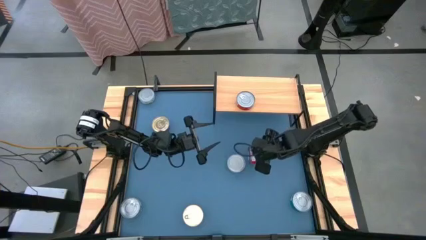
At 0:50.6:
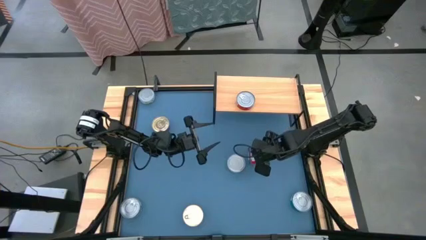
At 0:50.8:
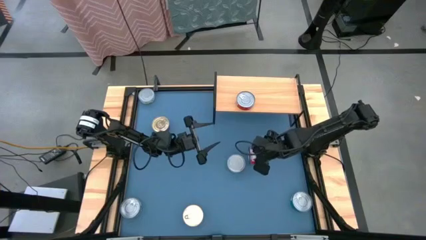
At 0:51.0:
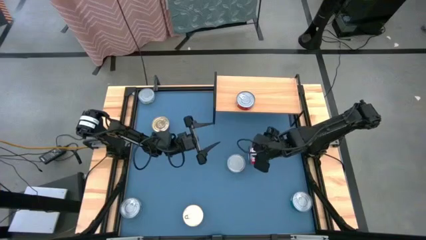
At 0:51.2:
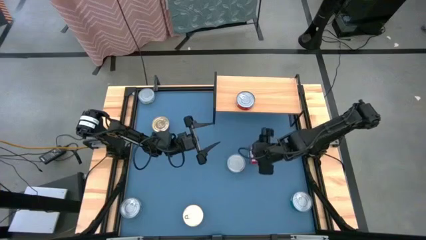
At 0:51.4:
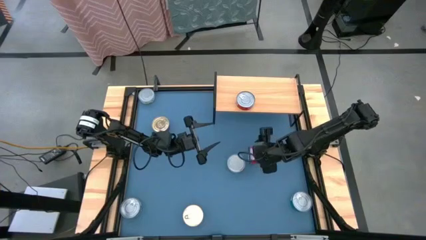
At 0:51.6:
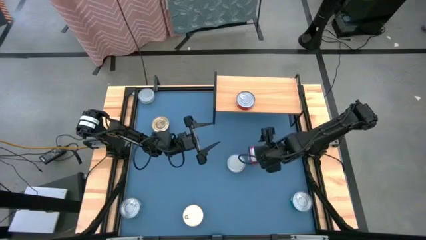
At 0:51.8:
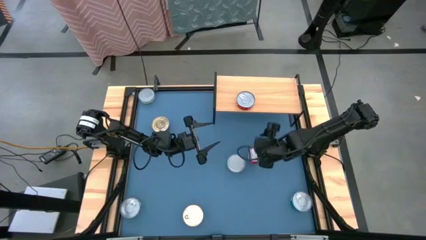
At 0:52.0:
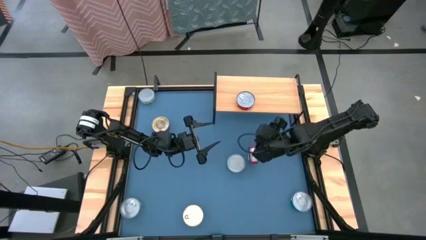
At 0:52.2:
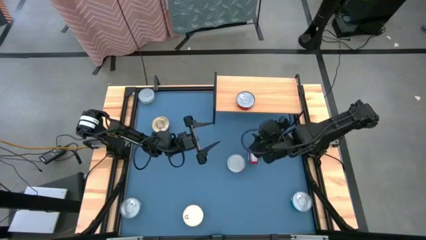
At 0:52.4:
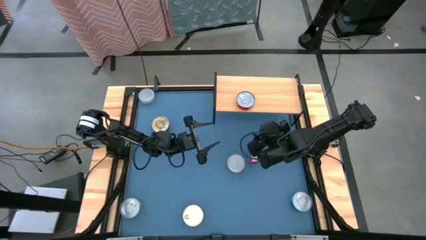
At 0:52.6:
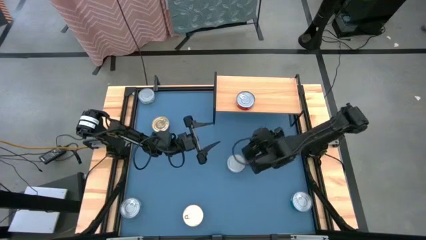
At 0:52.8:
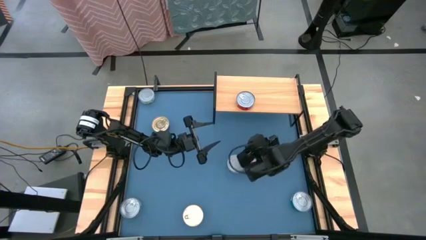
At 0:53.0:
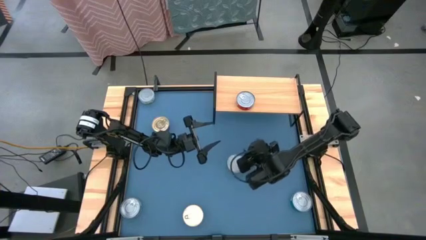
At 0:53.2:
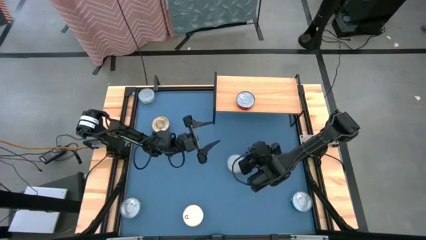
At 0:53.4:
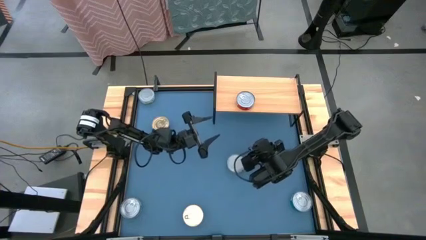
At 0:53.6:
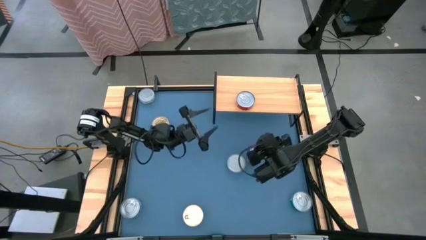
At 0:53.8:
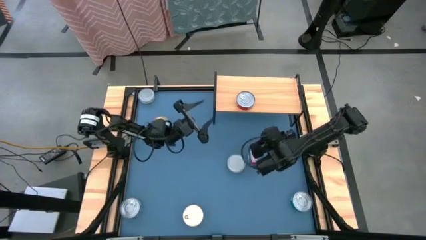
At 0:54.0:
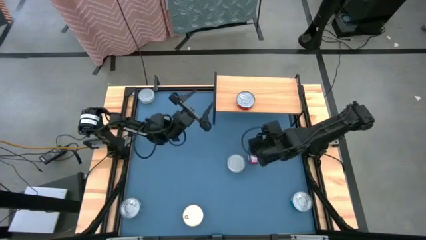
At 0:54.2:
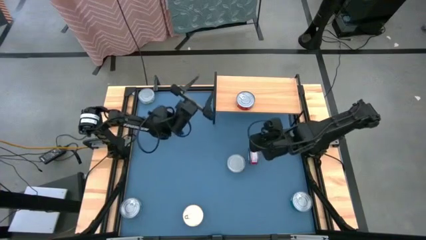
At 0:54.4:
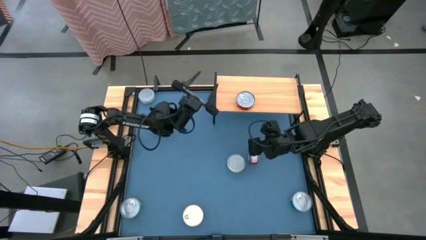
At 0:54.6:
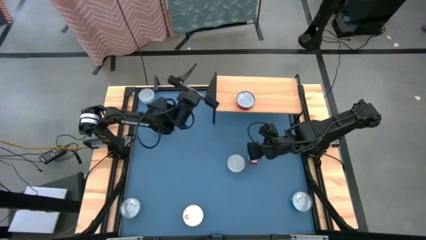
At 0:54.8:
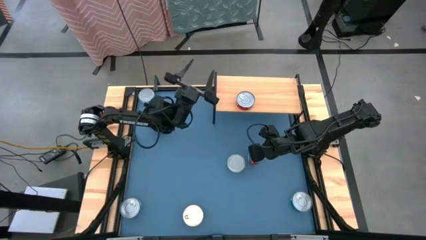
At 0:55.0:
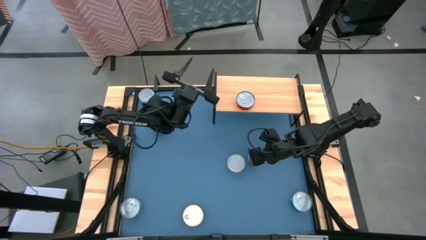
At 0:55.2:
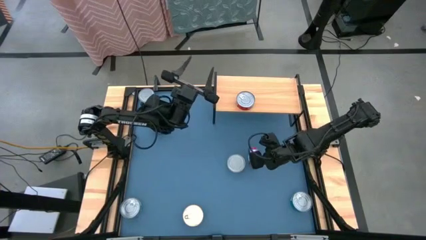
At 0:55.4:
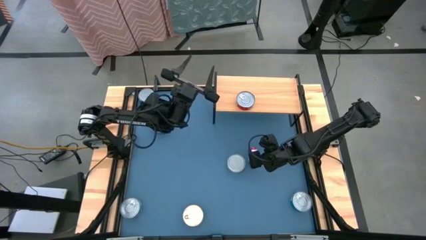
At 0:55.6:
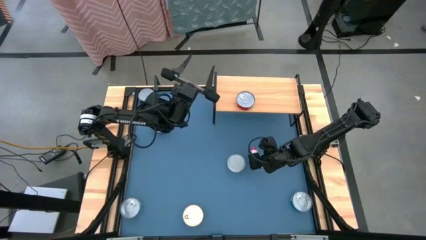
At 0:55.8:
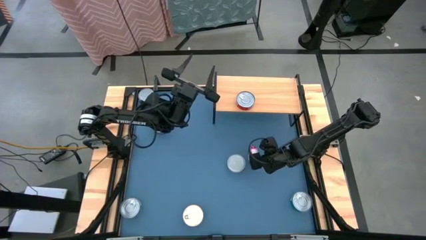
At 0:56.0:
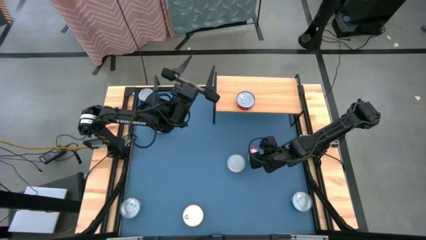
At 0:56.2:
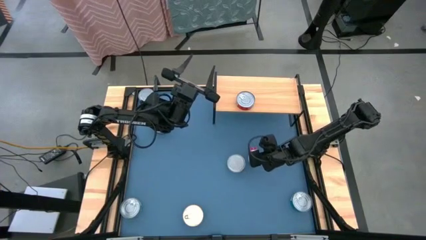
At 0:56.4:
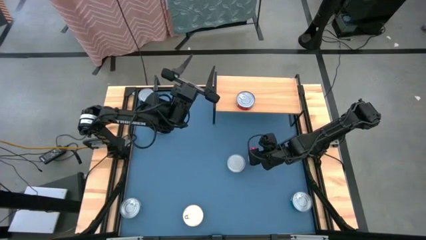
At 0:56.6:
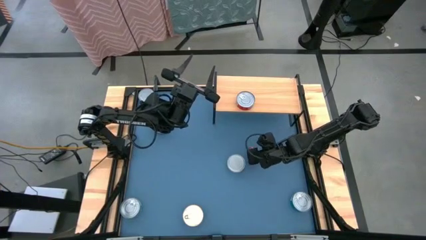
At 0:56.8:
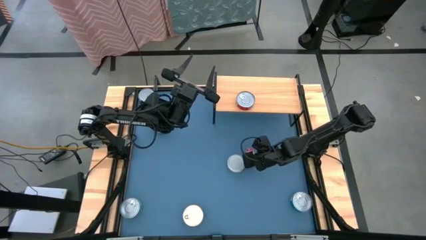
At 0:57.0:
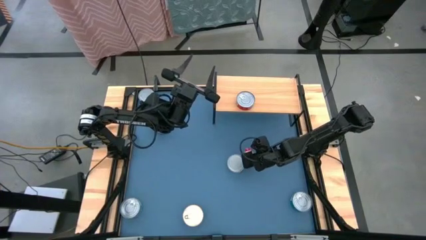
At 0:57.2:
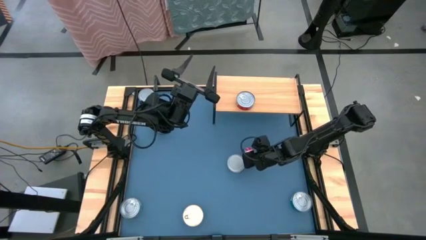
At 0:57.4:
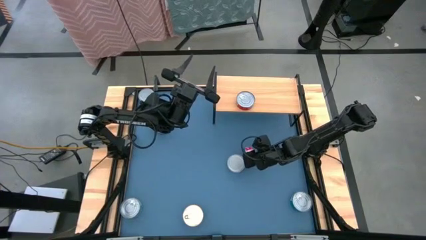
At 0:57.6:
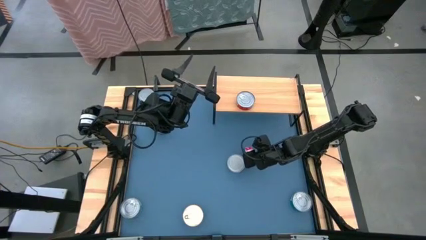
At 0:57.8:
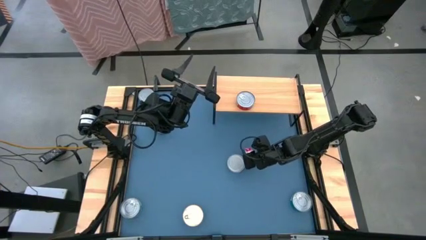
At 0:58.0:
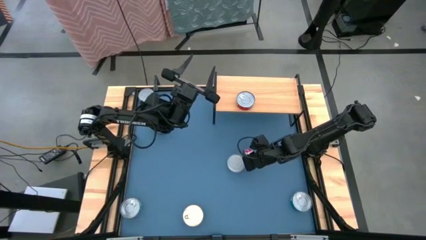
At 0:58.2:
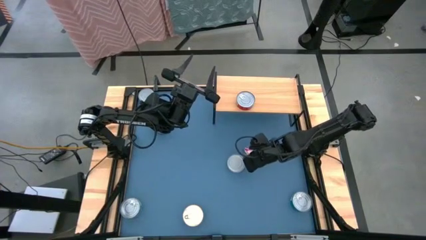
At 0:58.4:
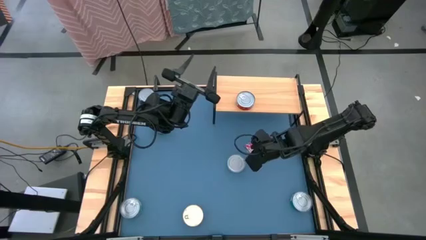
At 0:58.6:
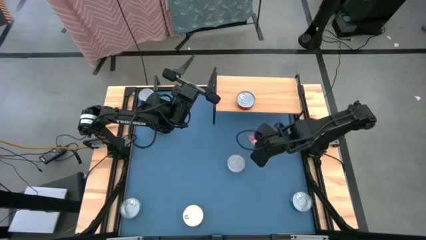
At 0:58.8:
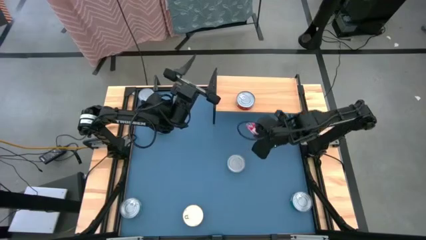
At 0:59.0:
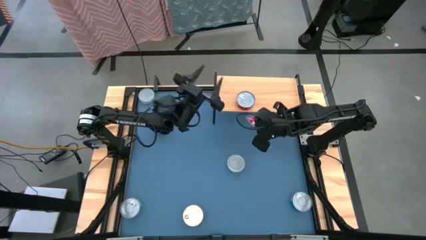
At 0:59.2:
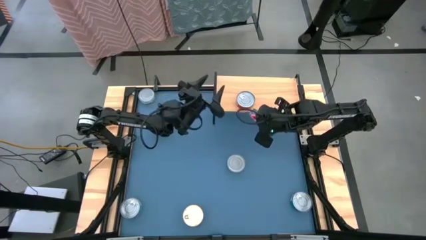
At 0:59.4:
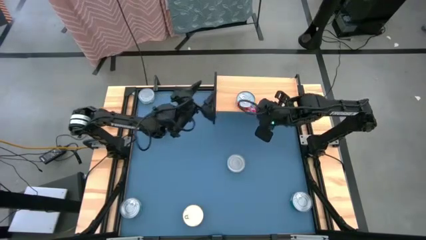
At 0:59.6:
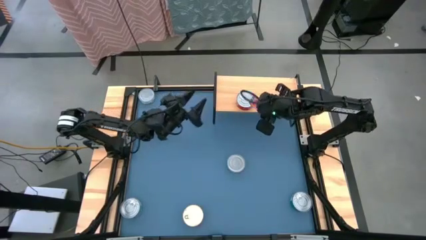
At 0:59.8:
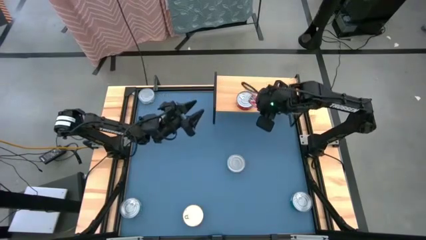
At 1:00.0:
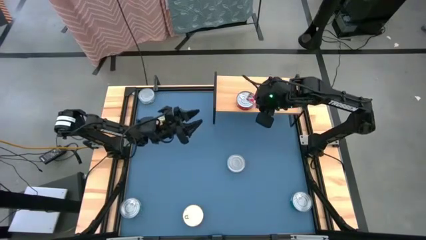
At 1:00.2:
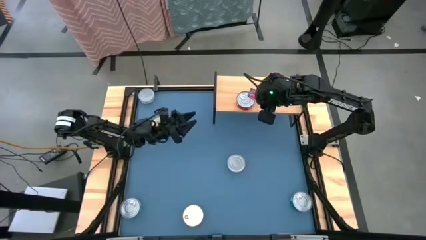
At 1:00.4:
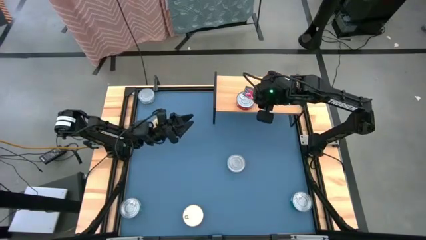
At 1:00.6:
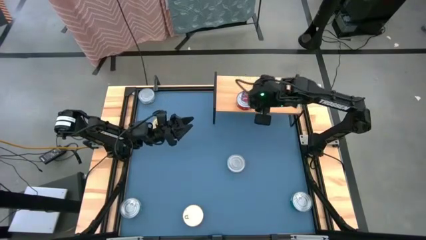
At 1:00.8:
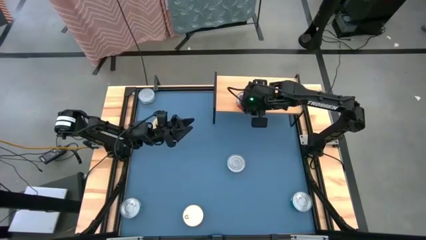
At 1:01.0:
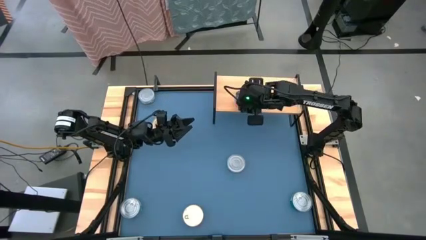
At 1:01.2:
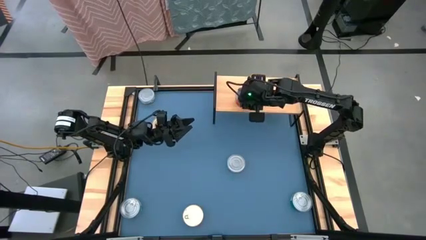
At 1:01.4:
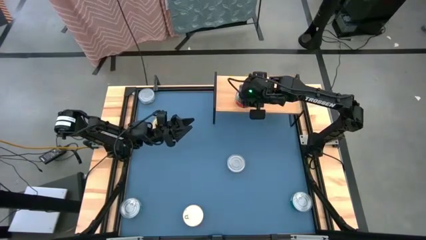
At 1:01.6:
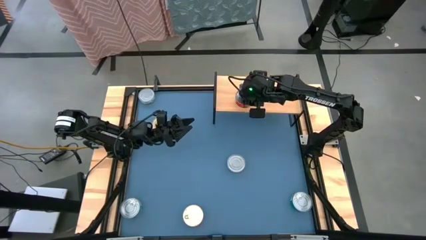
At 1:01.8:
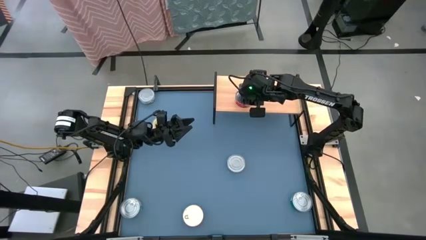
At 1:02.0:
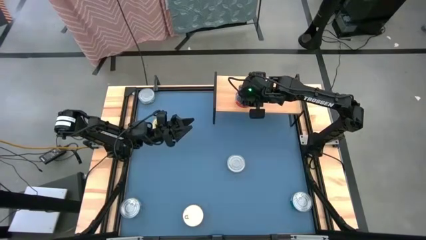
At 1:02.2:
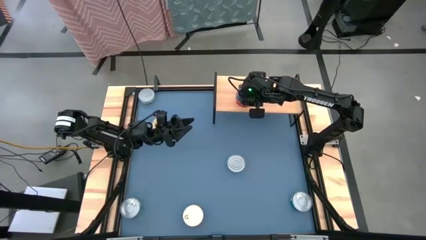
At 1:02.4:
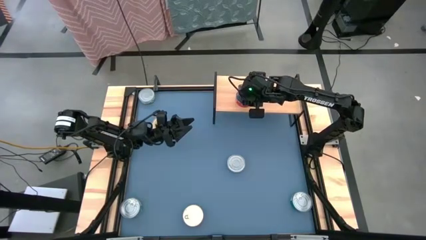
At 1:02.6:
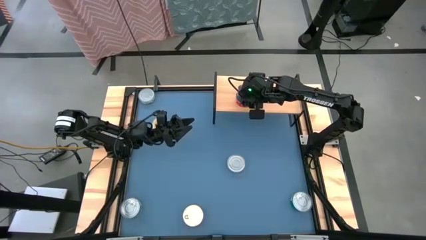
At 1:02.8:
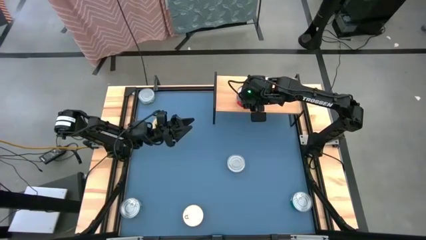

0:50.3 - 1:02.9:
Task: Stack canned seafood by type on shelf
Stack the red tuna can on top of the red tuna can on the shelf

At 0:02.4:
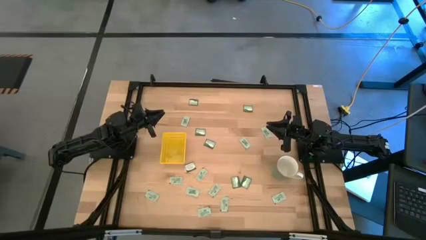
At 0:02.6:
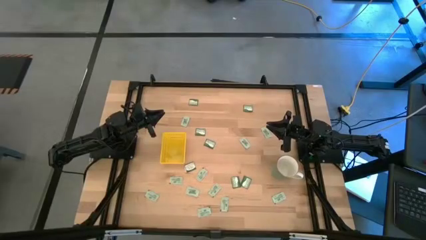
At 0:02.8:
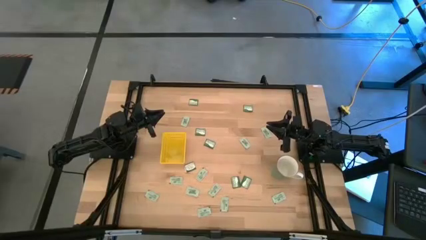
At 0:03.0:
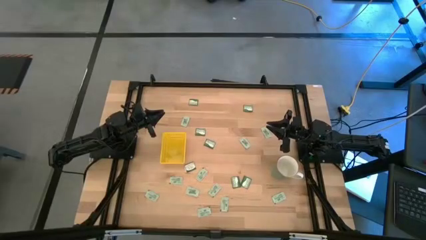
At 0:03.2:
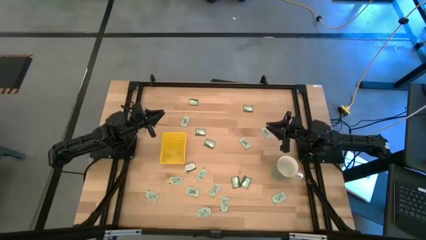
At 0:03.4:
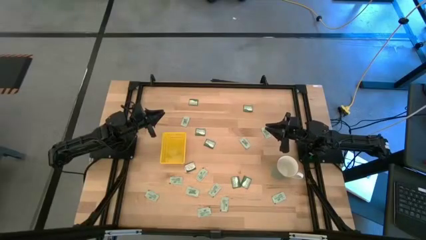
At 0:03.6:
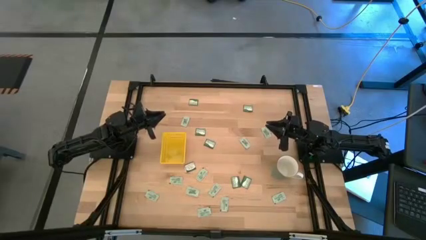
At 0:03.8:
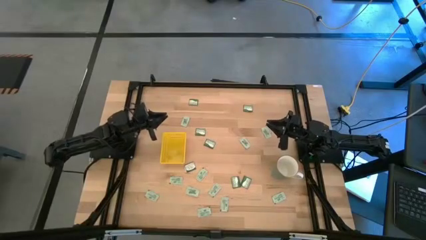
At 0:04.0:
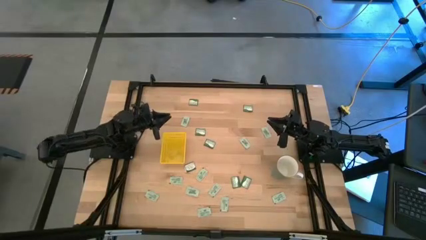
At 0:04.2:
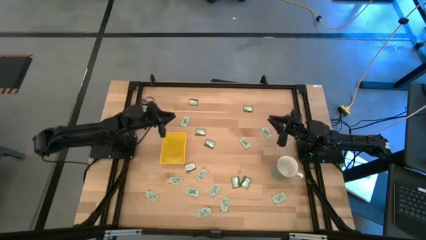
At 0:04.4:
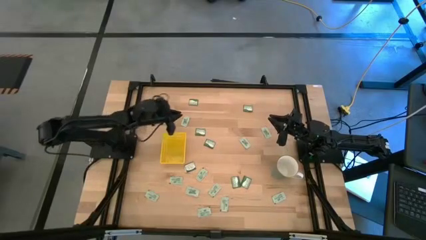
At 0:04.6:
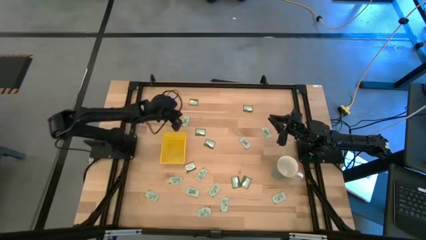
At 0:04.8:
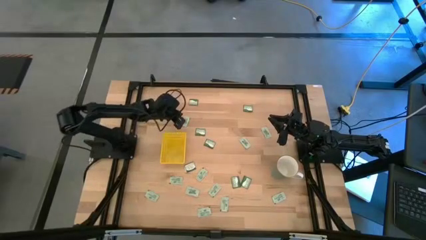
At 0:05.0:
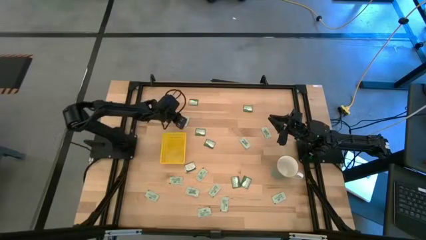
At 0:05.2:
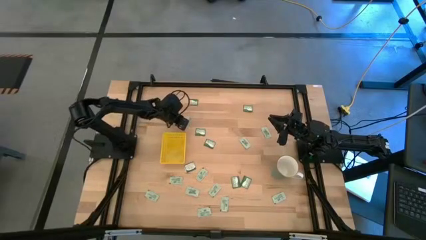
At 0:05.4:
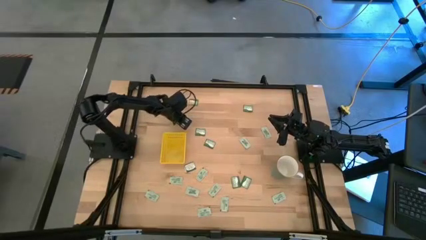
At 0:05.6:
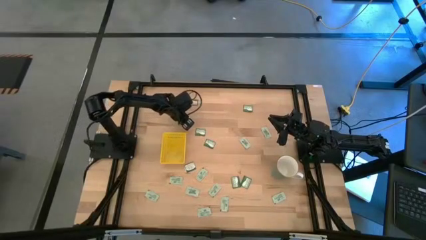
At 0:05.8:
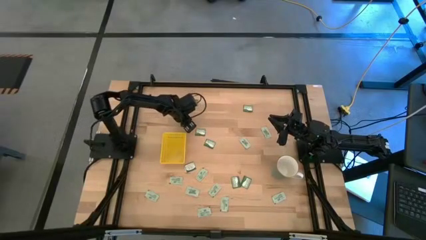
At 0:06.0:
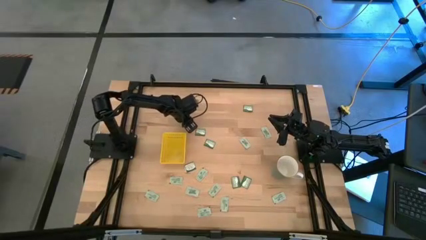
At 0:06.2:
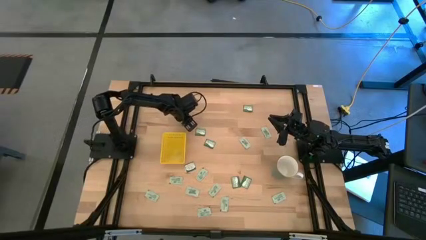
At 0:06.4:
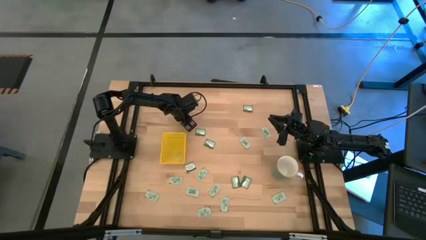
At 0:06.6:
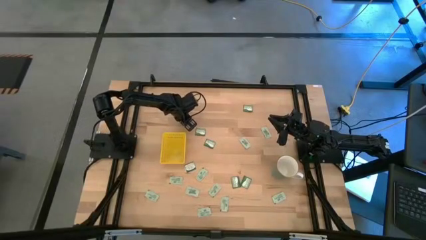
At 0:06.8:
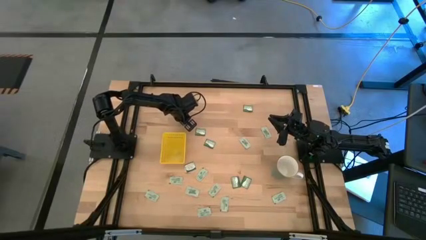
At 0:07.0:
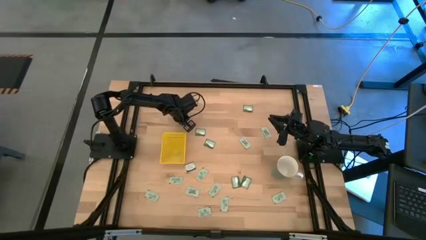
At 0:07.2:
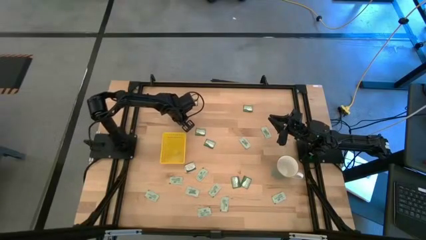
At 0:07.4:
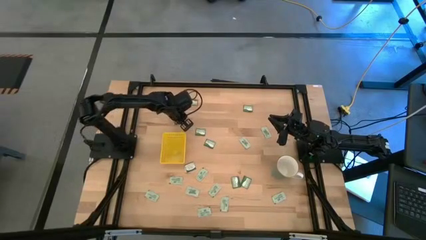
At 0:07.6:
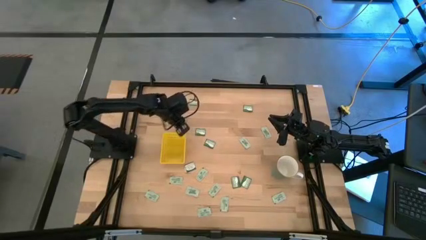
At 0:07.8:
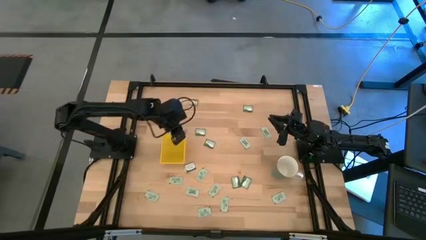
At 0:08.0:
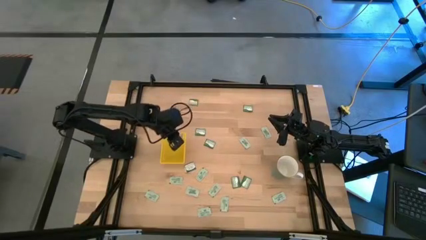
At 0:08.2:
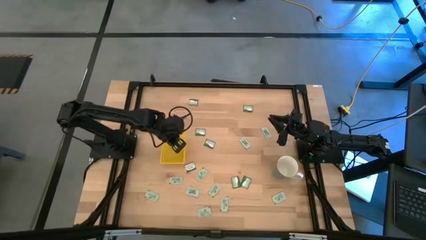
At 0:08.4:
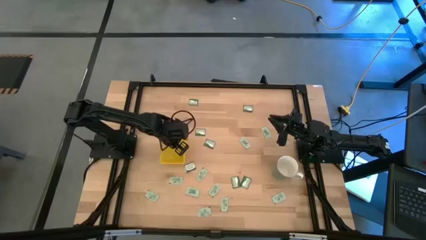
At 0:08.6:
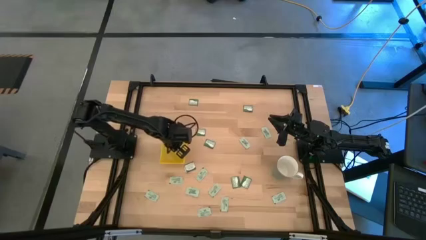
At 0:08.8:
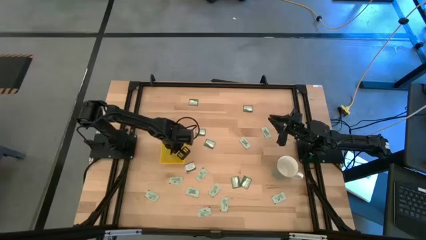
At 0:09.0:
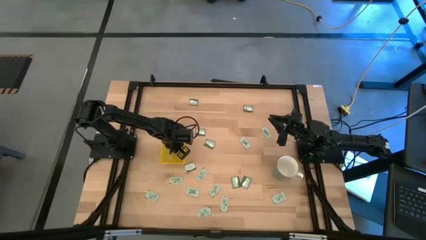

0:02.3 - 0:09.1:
Task: Pick and place Stevia / Truvia into bins
Put the white packet into the yellow bin
